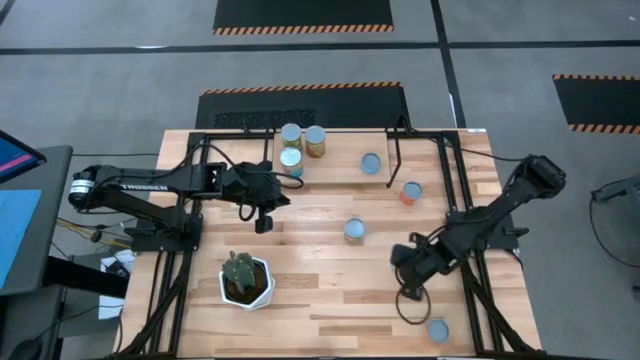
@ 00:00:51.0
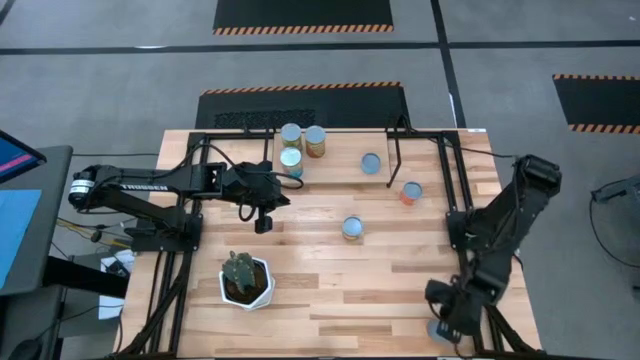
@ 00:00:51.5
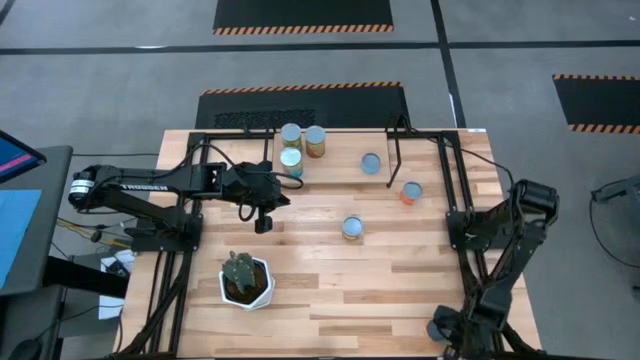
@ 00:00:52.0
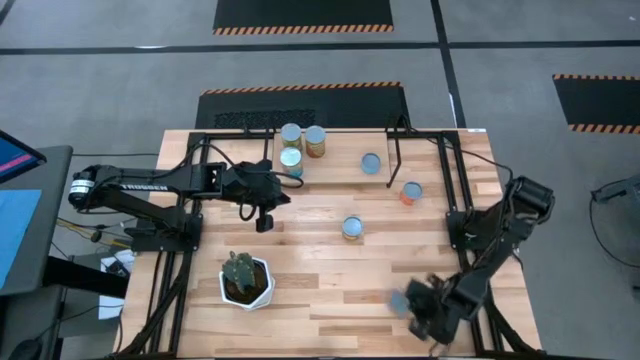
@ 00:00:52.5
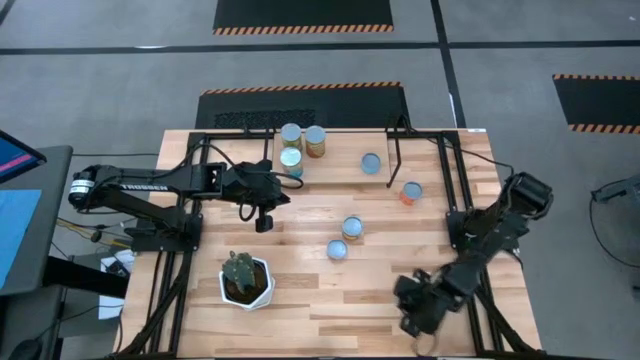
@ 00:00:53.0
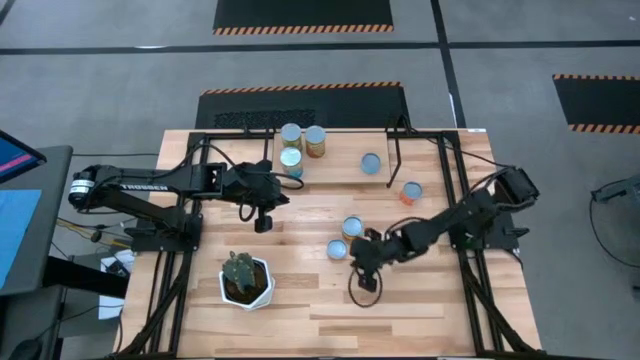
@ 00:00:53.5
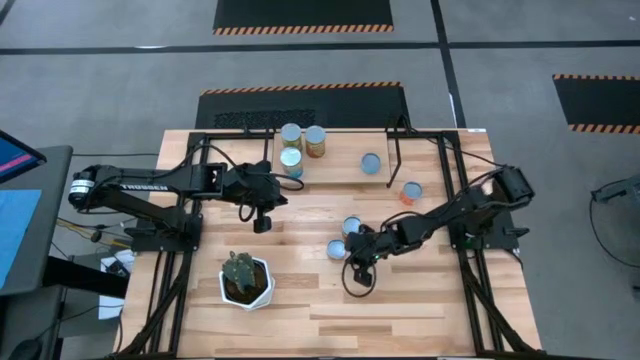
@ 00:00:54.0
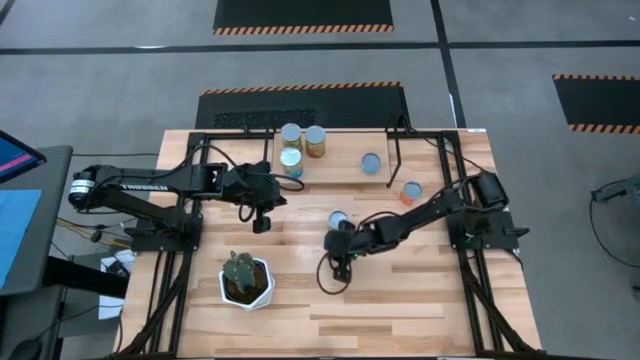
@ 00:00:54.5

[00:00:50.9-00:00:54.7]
Task: Pick and place cans onto a shelf
Move the canned pineapple rings to the middle of the table

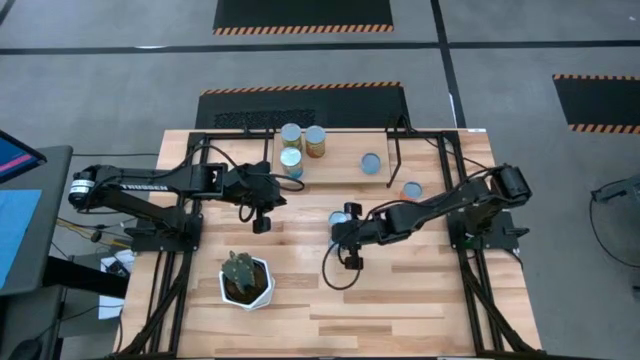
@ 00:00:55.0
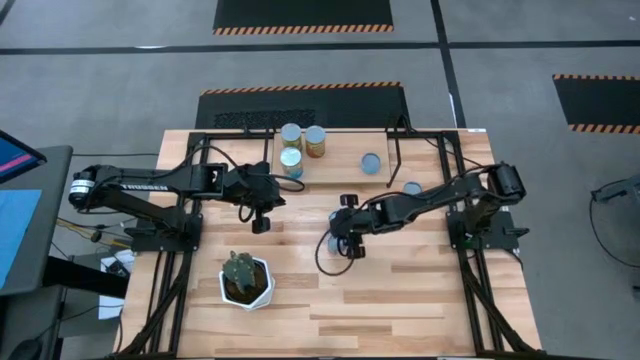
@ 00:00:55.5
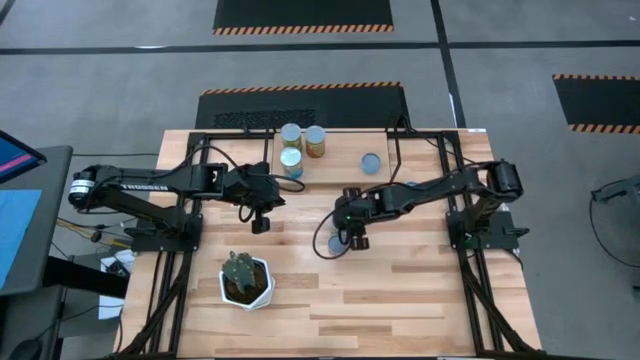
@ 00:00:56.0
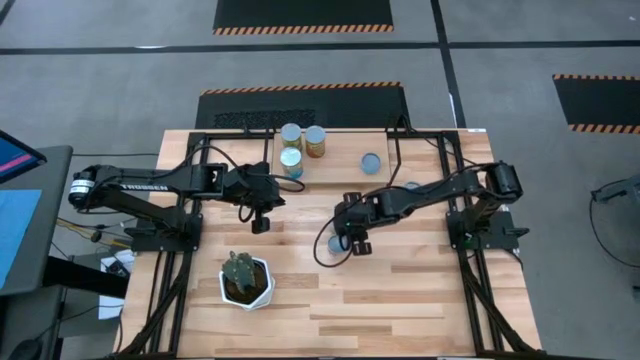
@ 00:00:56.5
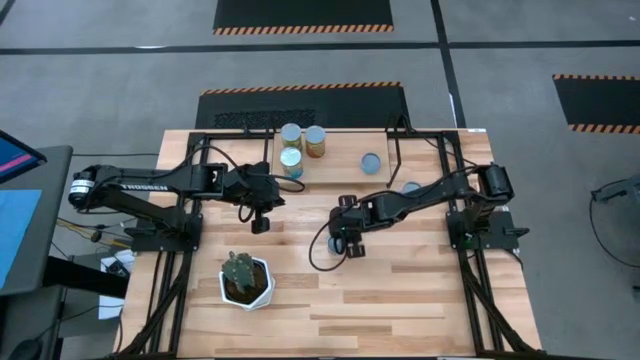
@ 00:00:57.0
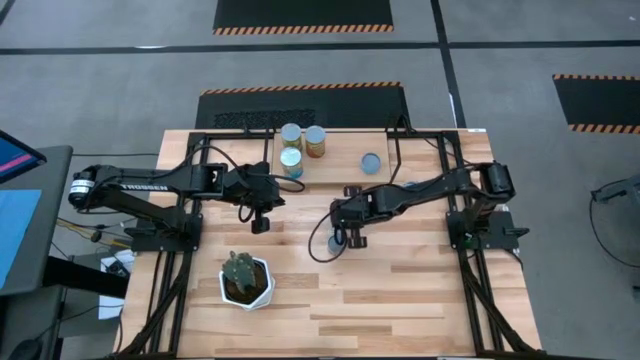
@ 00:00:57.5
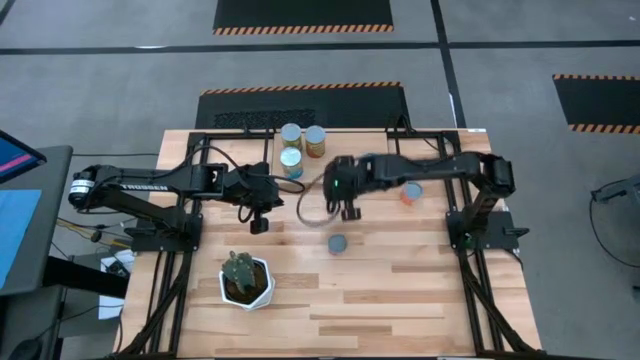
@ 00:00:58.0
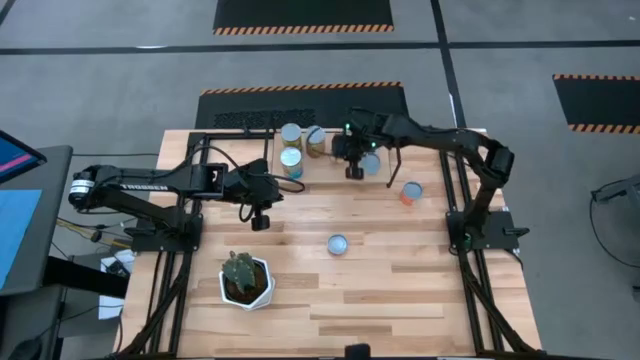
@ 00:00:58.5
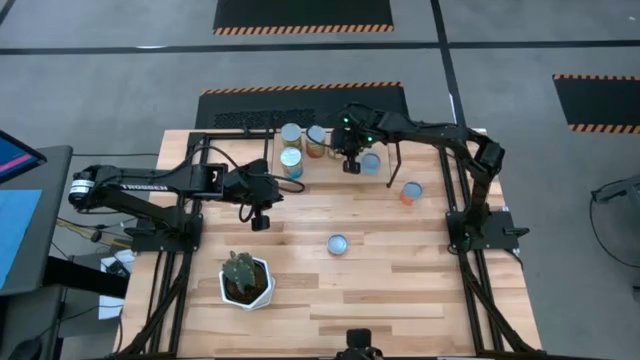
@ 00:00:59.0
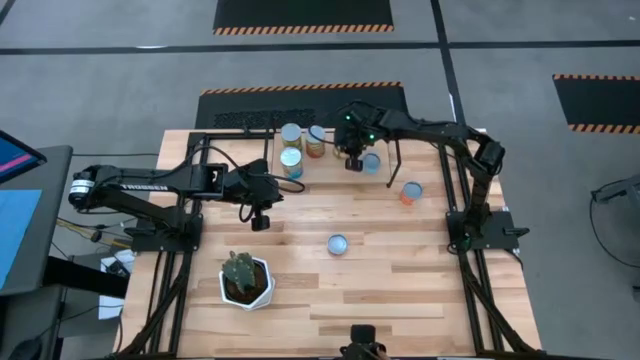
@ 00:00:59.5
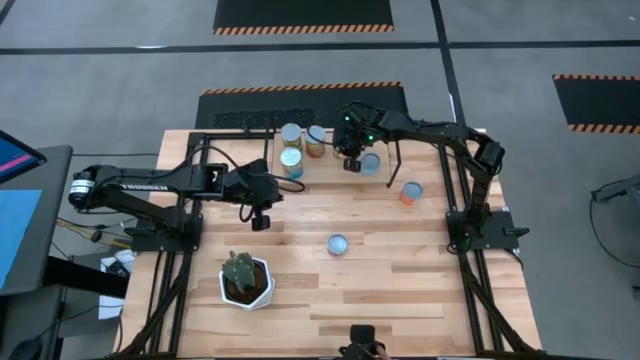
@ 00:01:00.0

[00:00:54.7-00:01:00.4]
Put the canned peaches on the shelf

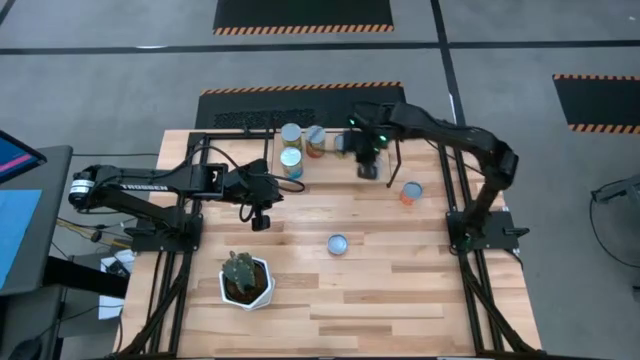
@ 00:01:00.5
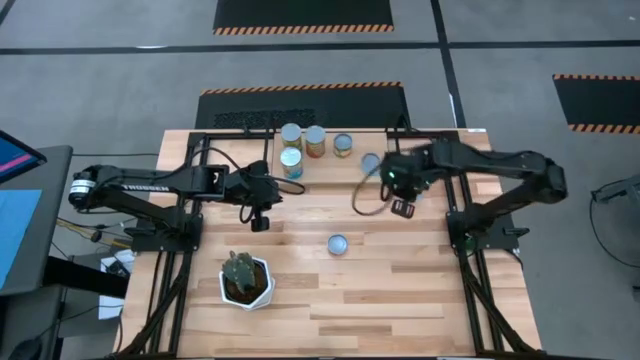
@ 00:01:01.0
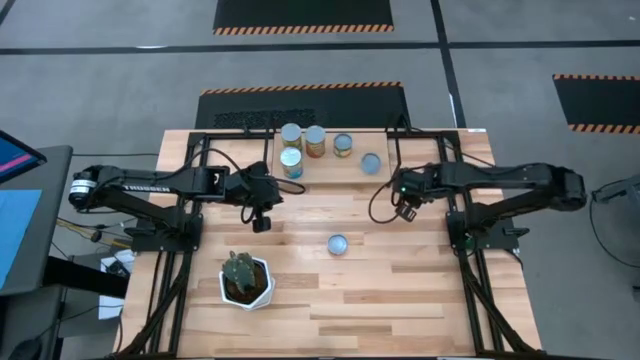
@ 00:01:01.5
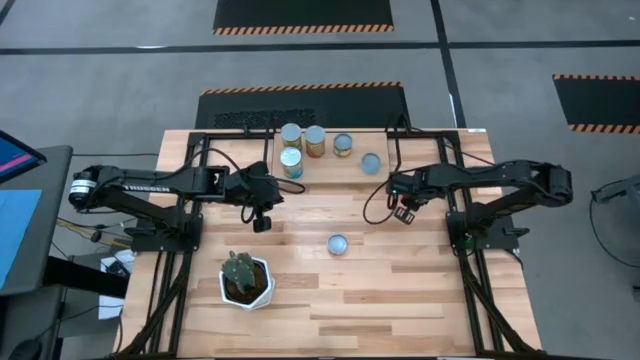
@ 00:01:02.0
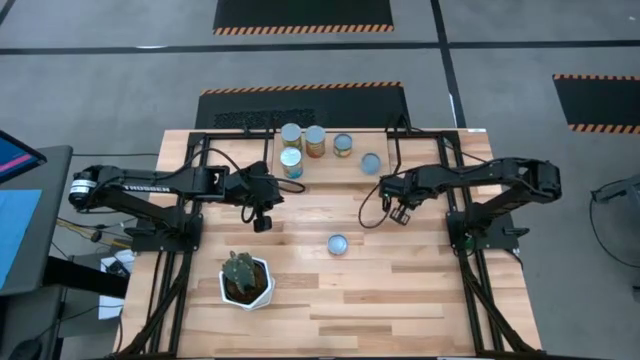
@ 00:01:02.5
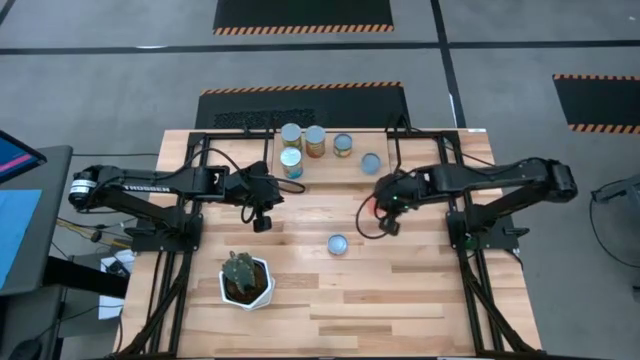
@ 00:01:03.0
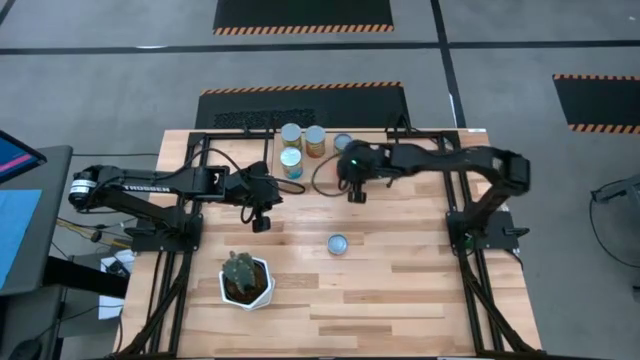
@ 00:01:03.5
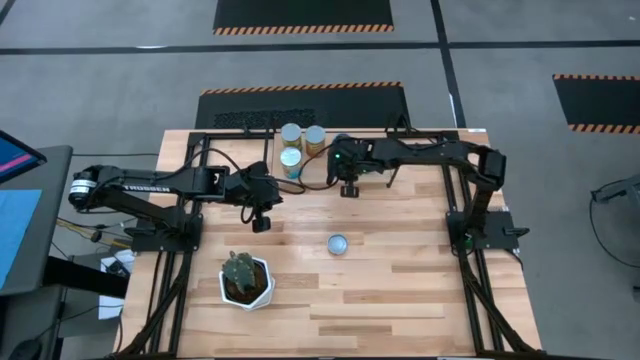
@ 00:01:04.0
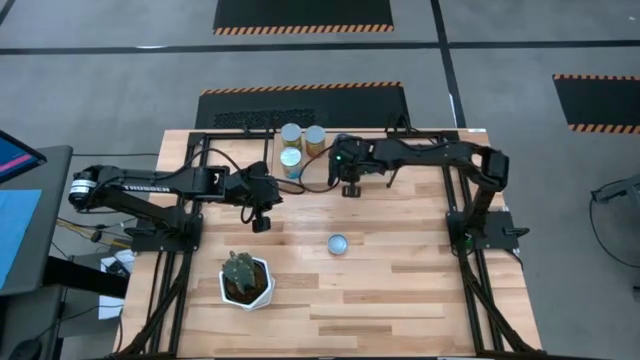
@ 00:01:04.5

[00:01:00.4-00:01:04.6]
Put the canned meat balls on the shelf

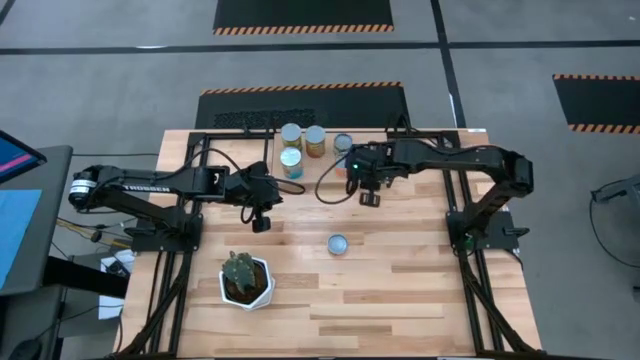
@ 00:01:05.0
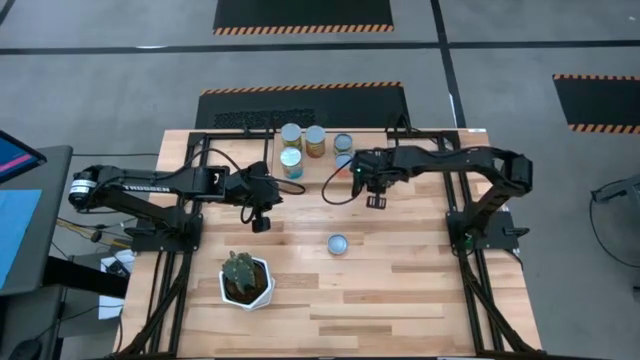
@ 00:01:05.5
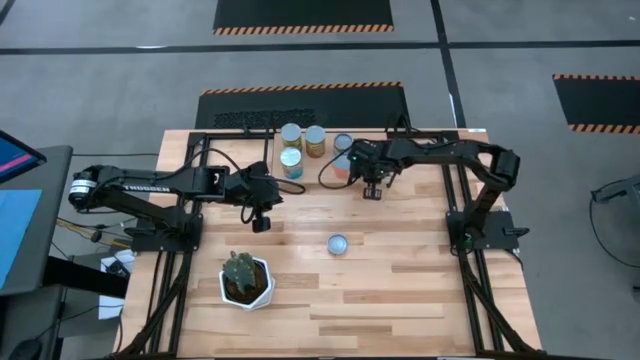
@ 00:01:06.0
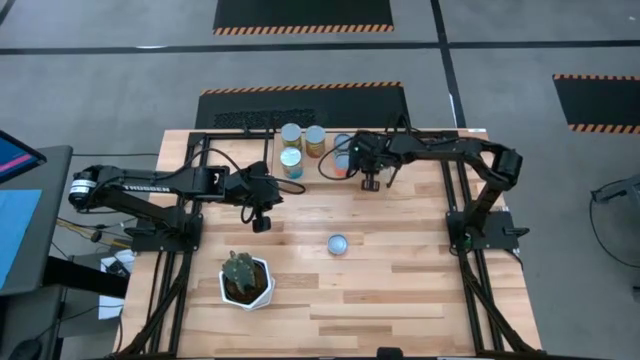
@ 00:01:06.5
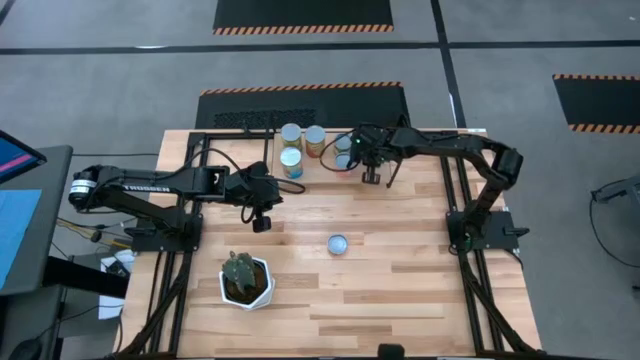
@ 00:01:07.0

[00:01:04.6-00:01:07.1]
Adjust the canned tuna on the shelf

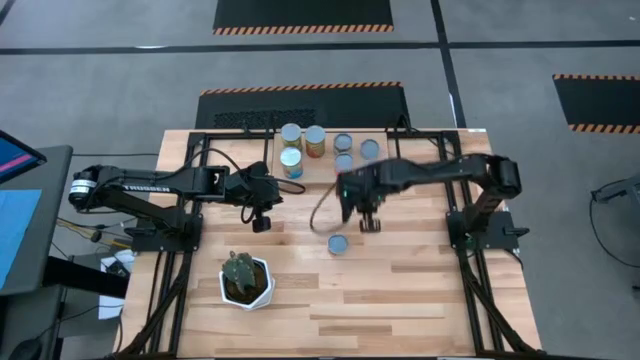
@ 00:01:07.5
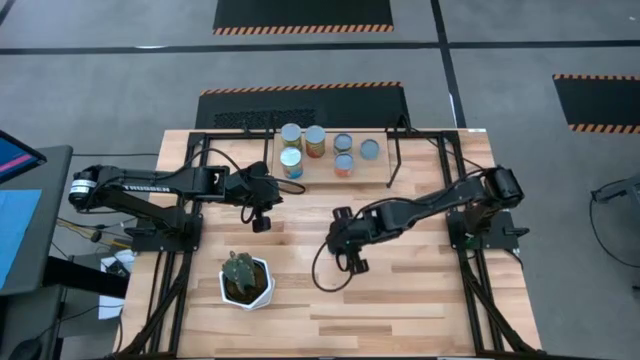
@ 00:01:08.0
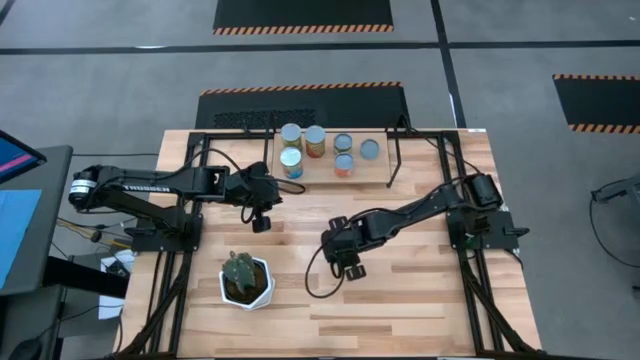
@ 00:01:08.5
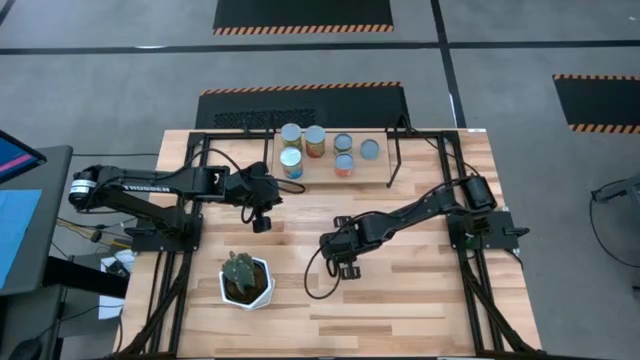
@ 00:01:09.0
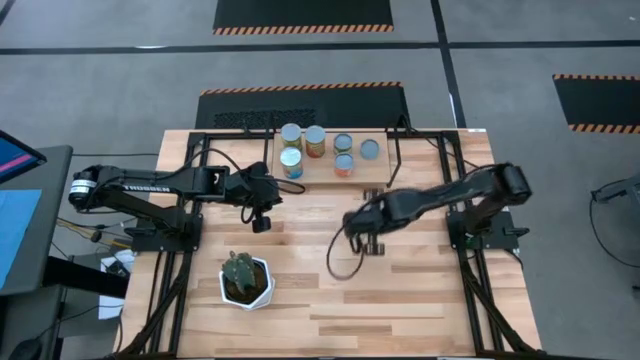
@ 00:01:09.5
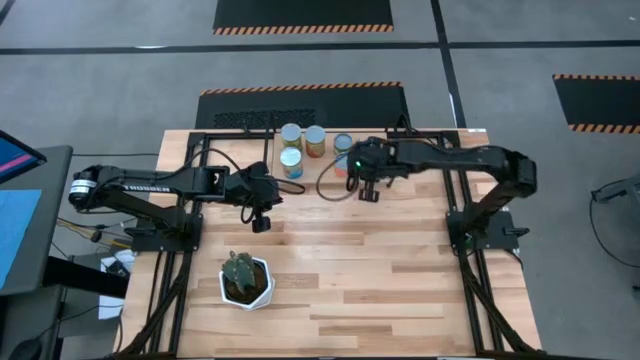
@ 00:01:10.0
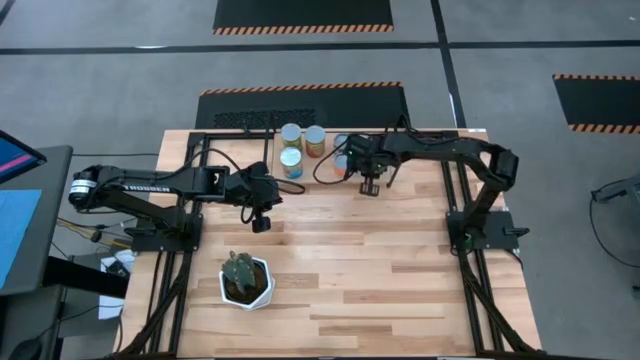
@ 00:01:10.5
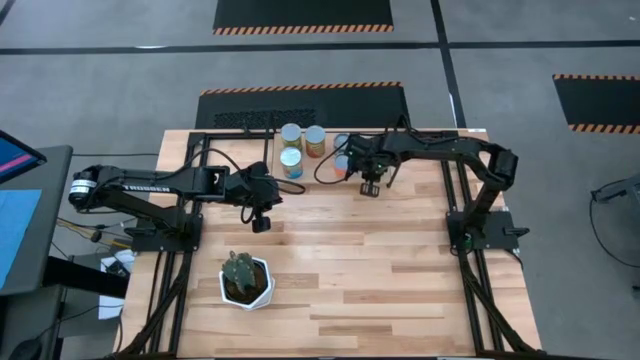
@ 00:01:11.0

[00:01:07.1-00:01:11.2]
Put the canned pineapple rings on the shelf
